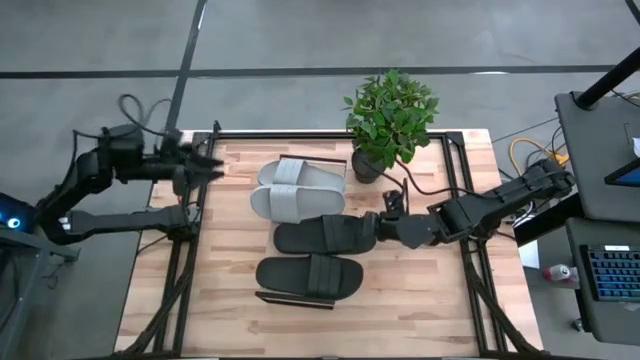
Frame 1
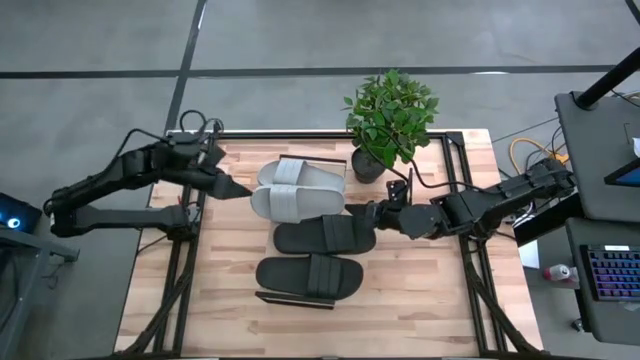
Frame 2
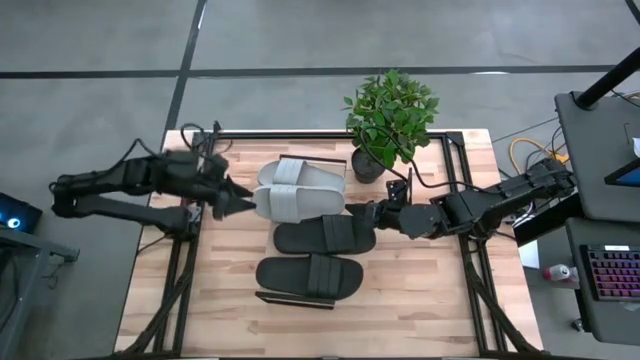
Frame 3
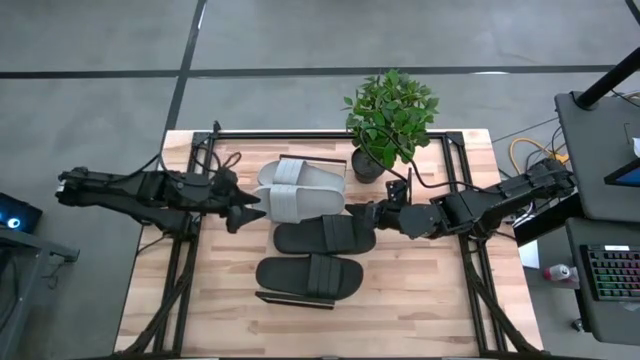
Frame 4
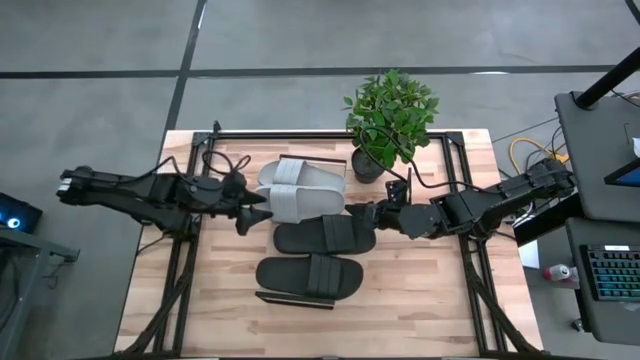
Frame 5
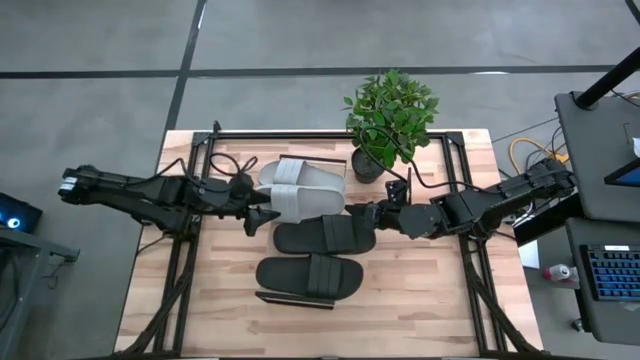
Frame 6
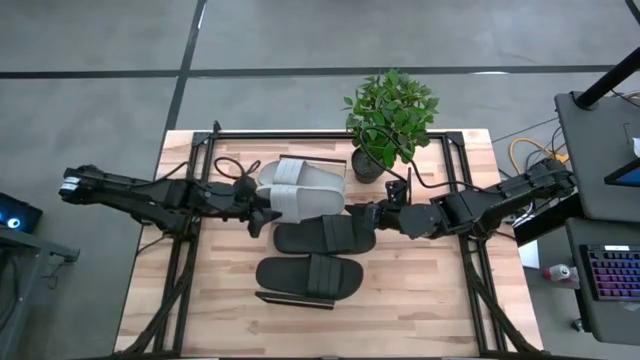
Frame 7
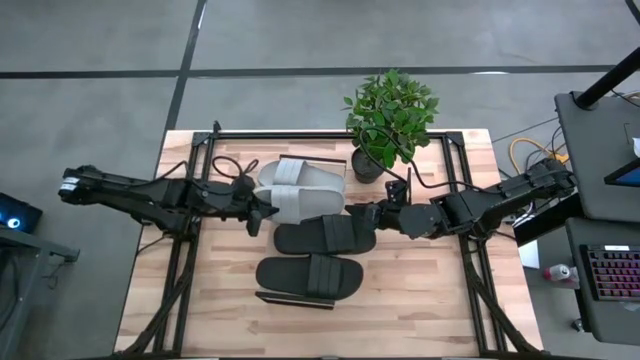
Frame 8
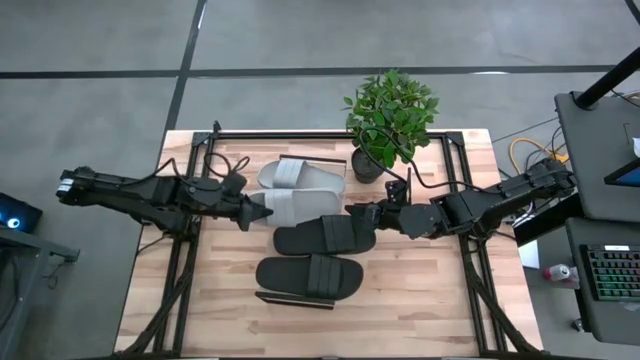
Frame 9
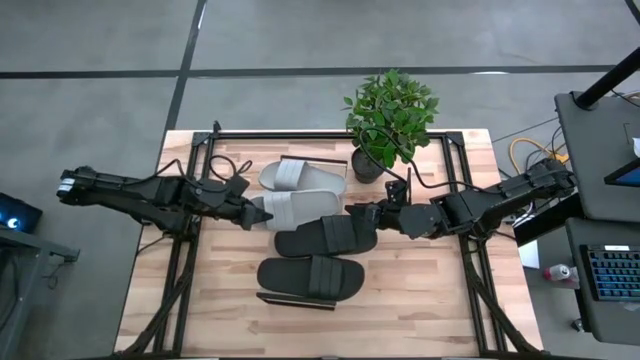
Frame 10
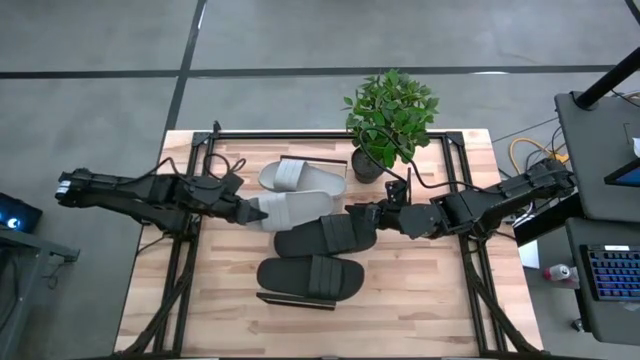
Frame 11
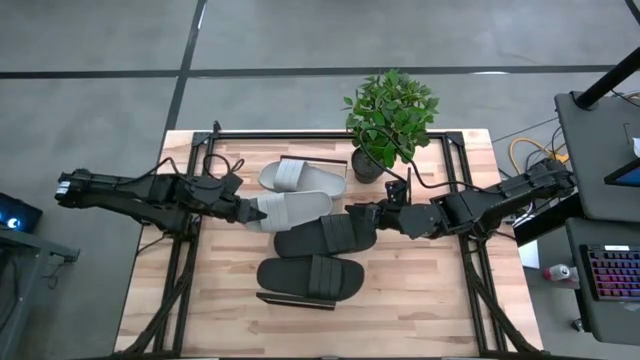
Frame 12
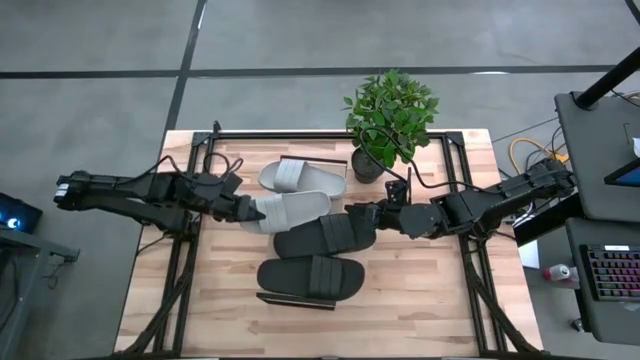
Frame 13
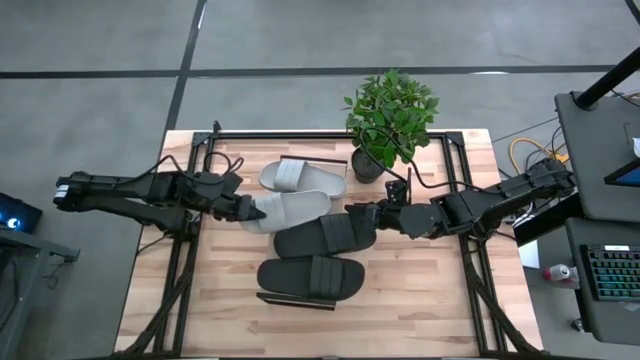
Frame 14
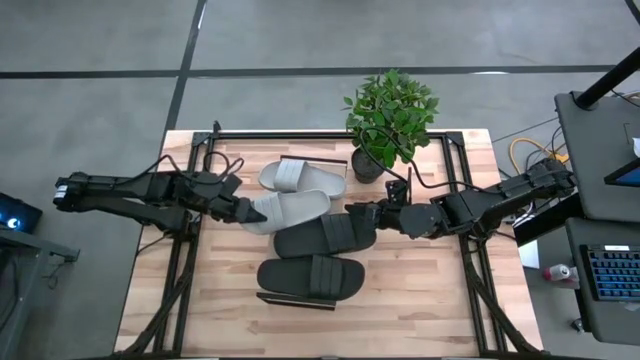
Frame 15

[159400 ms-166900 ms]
Task: Pick and place slides into the shelf
Adjust the bottom gray slipper

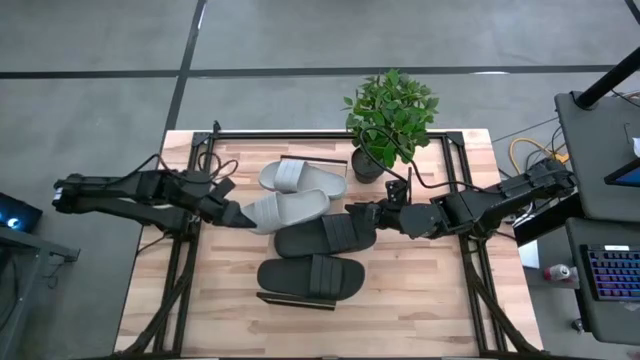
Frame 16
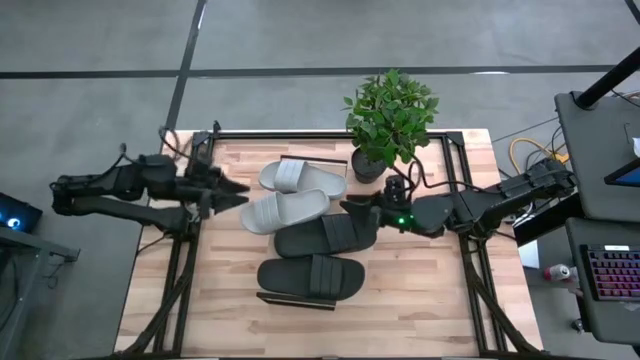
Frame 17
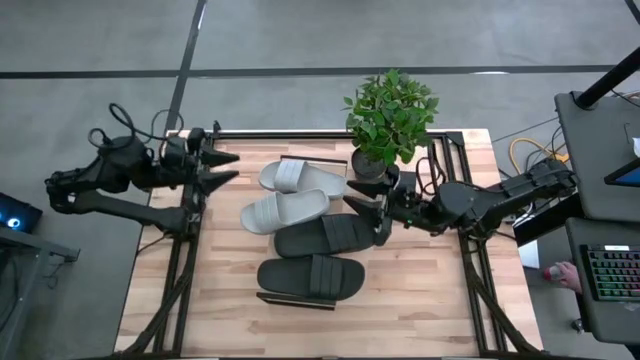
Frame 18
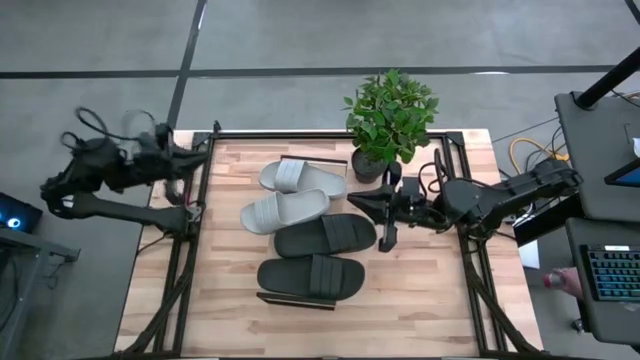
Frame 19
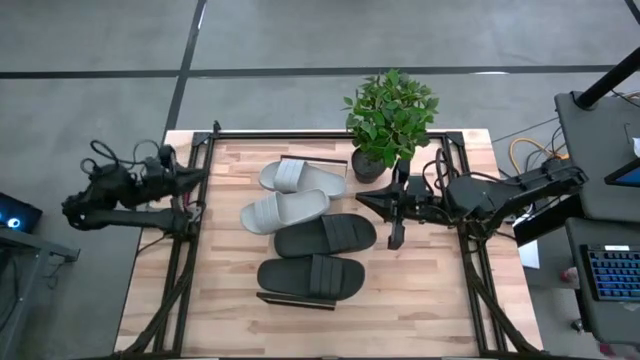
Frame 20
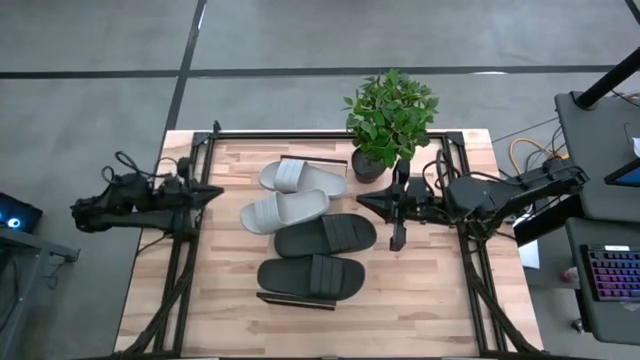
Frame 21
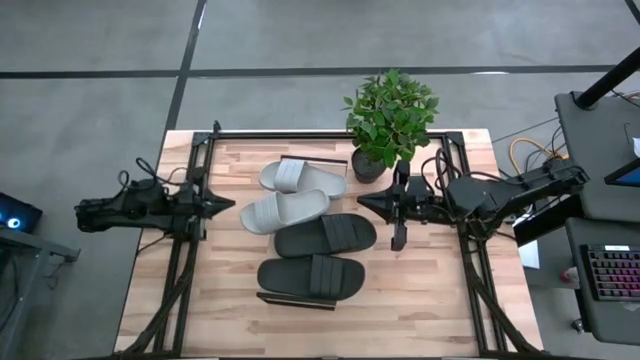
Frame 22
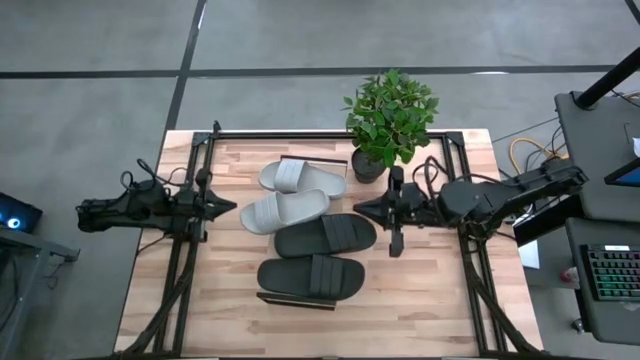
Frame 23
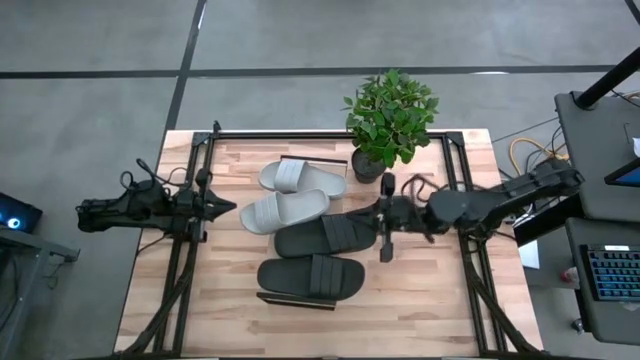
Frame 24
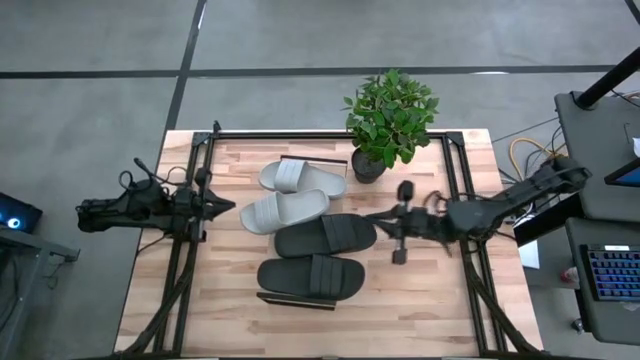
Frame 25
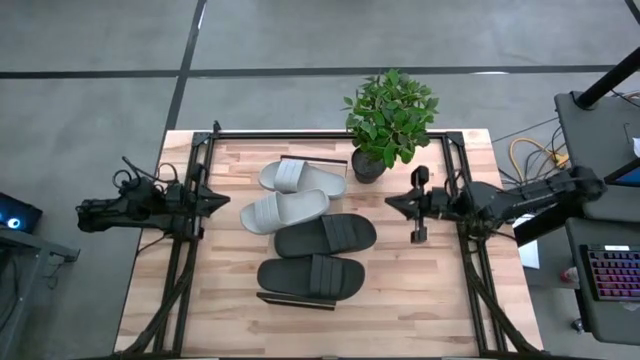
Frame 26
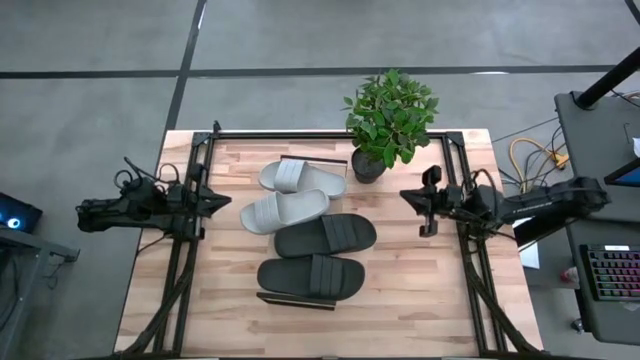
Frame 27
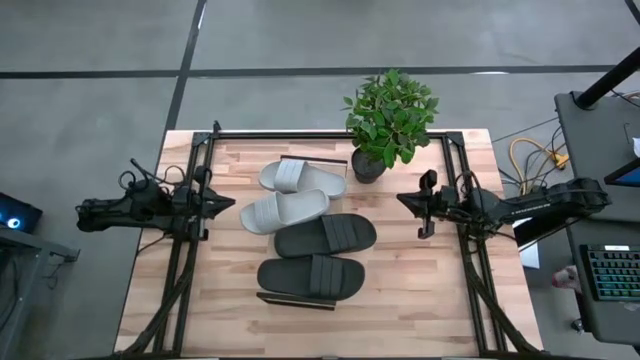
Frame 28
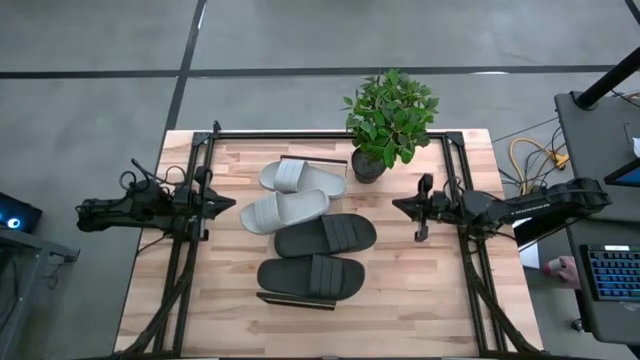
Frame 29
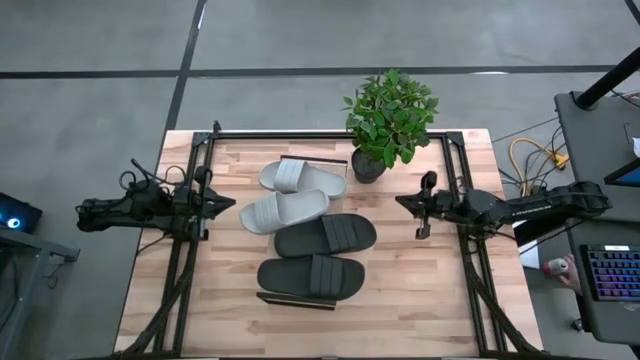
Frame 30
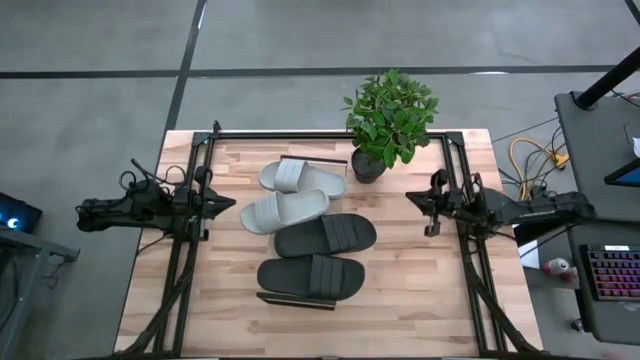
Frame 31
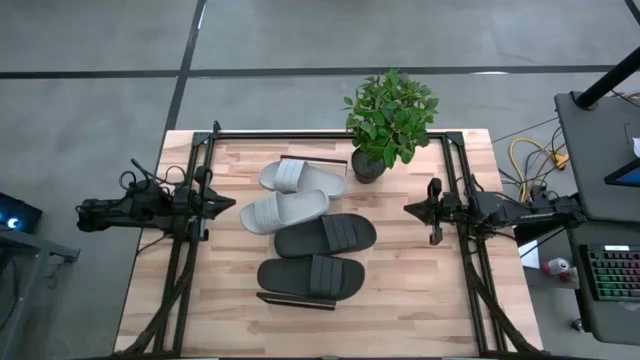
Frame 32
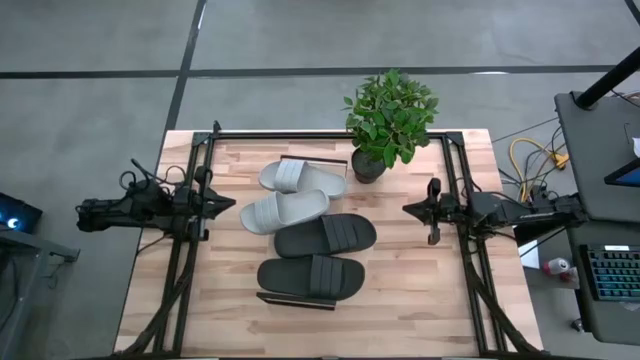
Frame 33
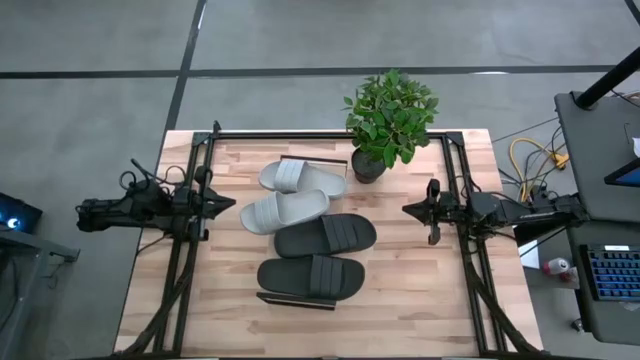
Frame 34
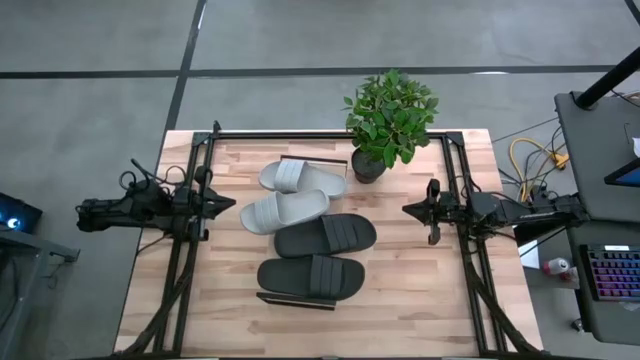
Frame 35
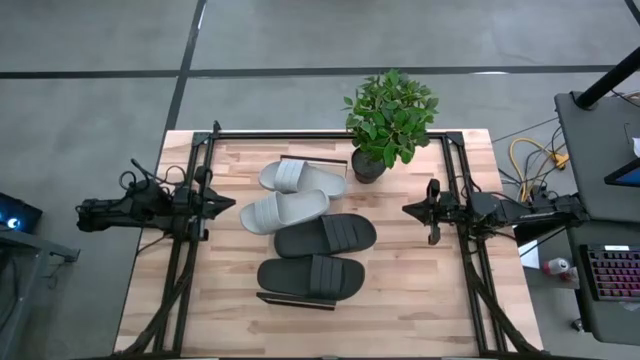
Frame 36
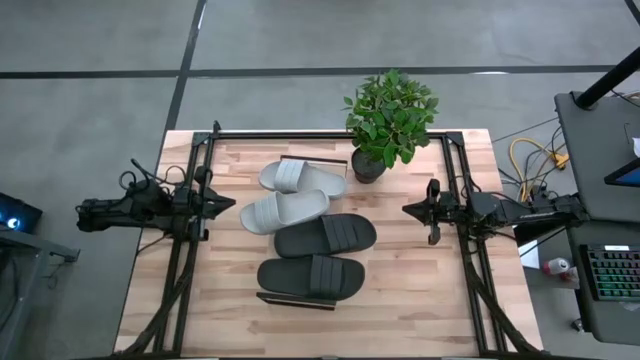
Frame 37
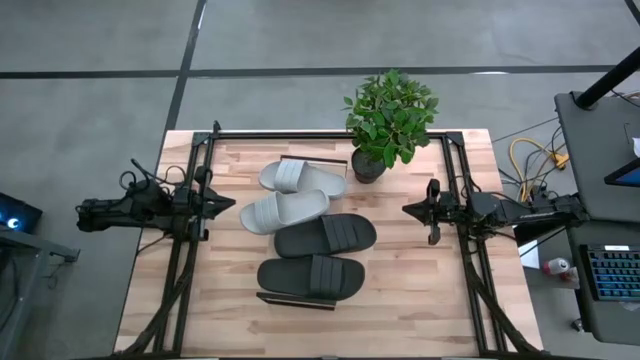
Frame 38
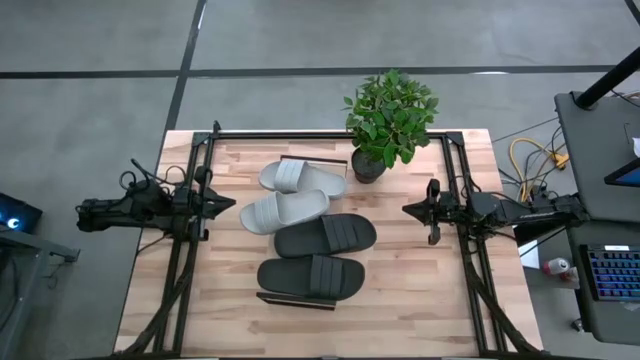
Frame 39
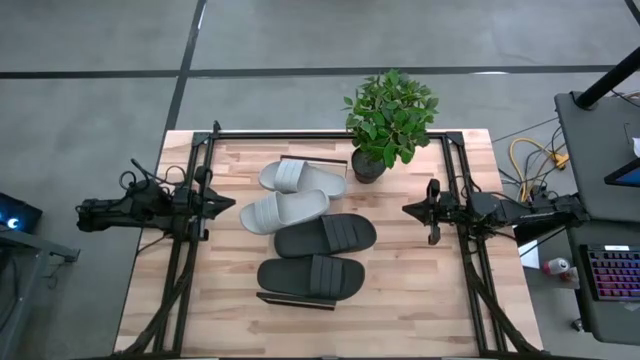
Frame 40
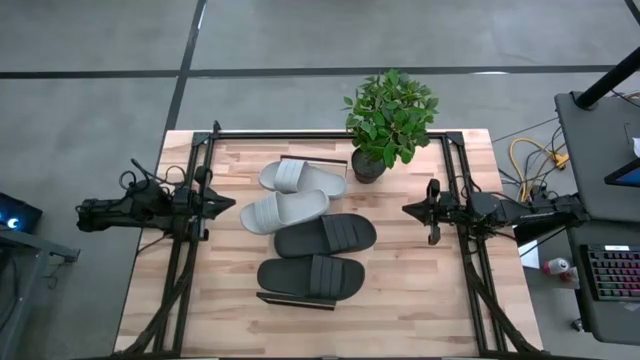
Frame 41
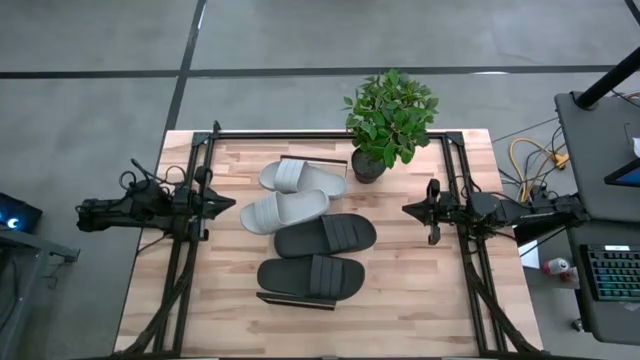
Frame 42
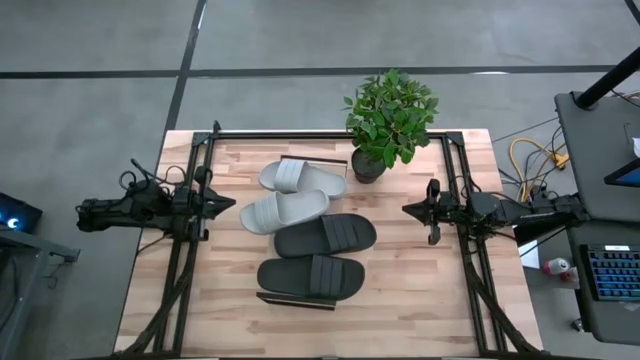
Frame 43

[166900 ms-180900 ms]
Return to Home Position
